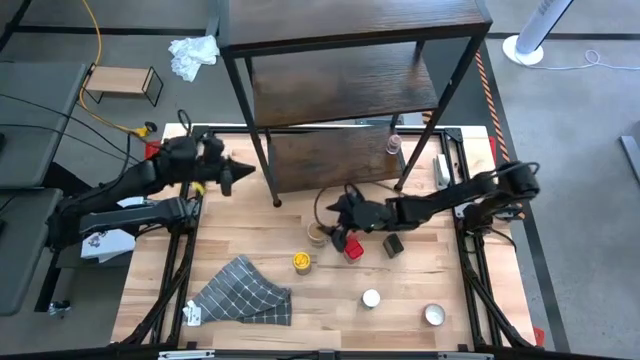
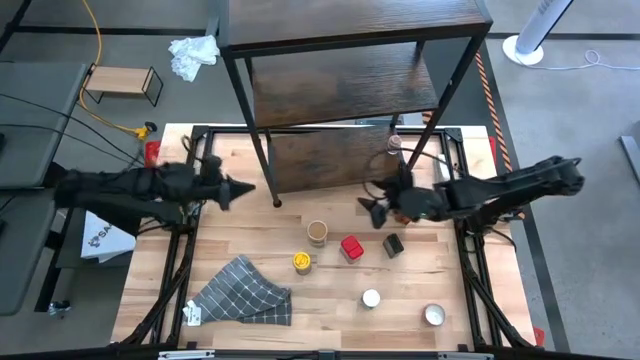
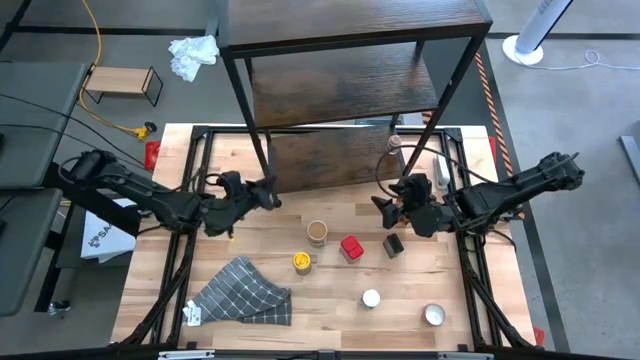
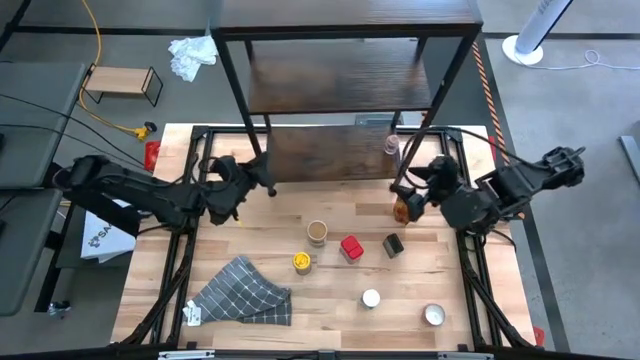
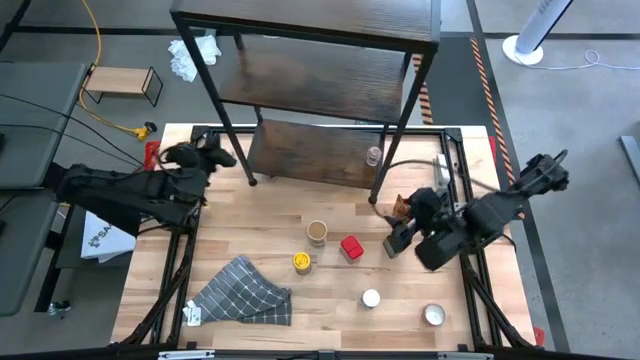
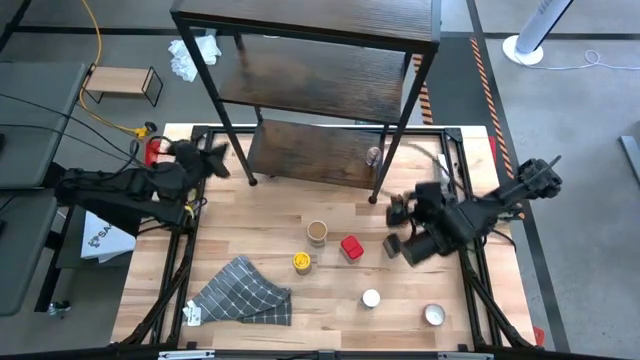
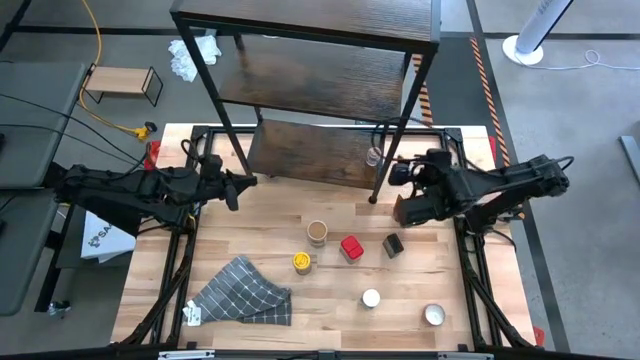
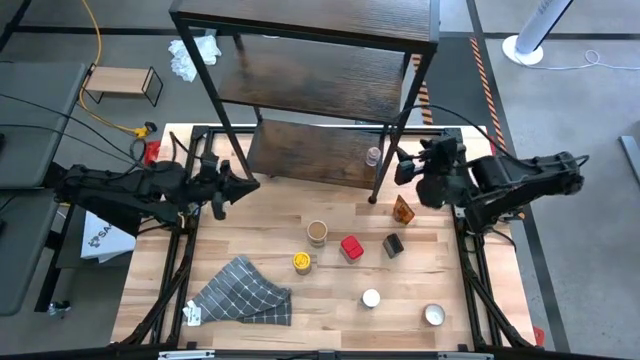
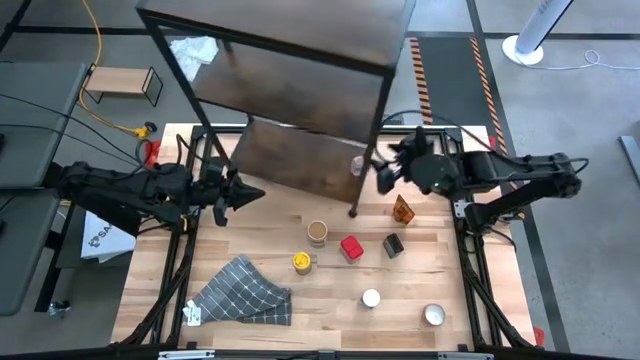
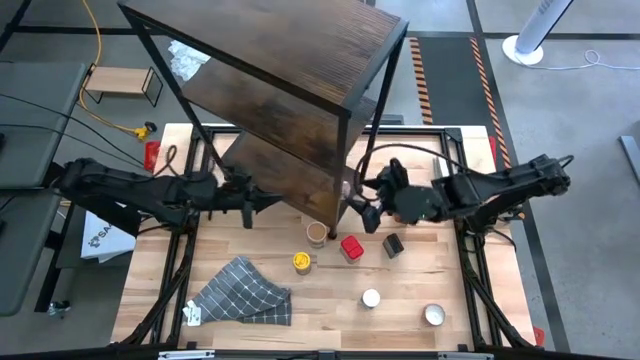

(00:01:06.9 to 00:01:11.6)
Task: Shelf spices
Adjust the shelf

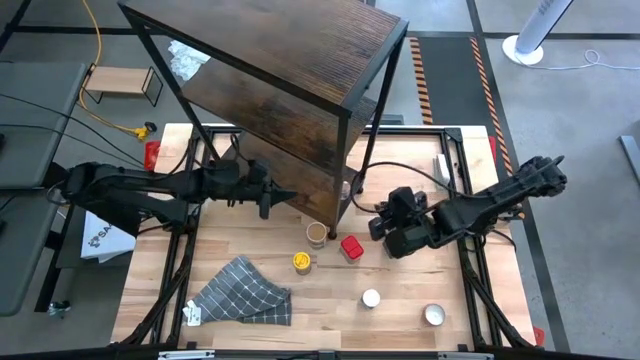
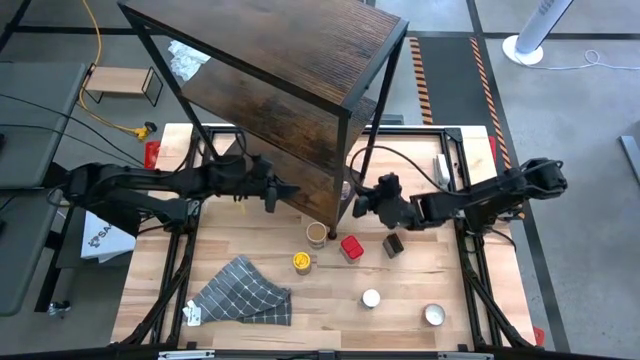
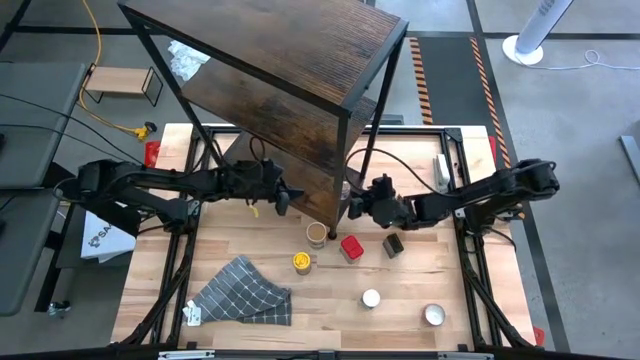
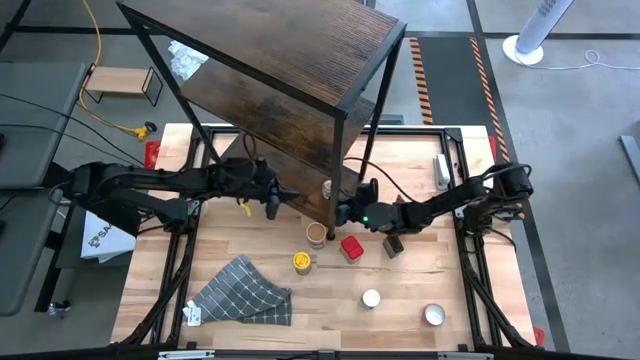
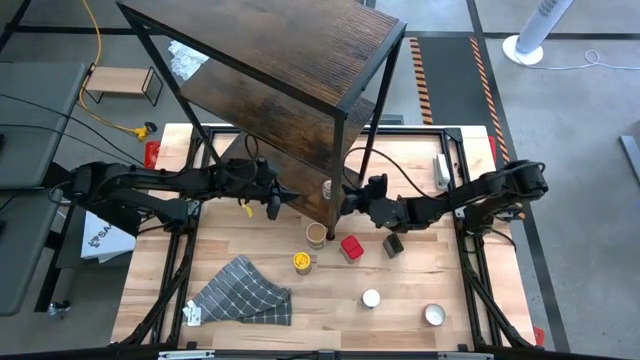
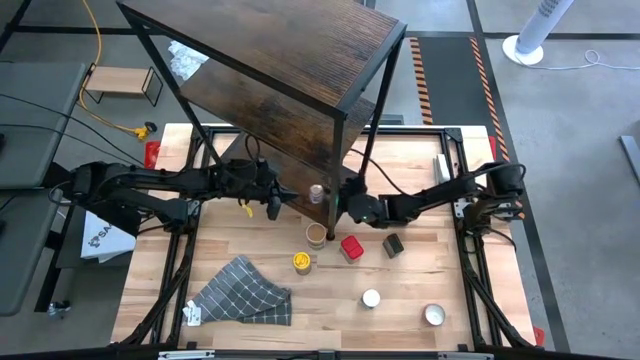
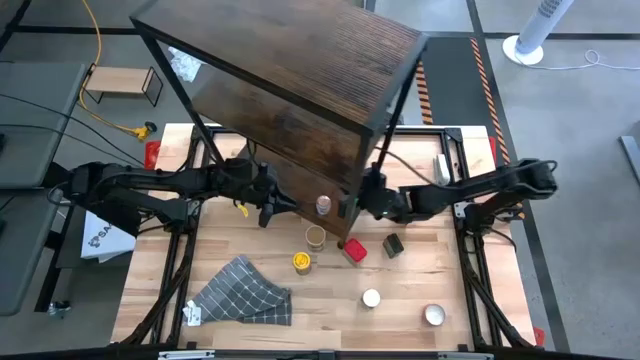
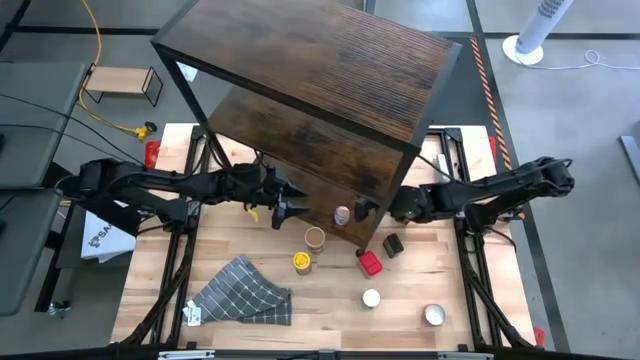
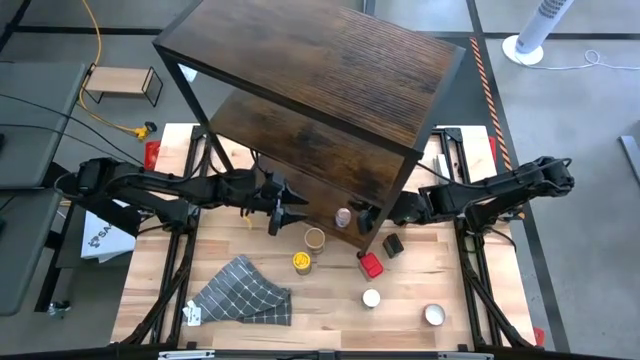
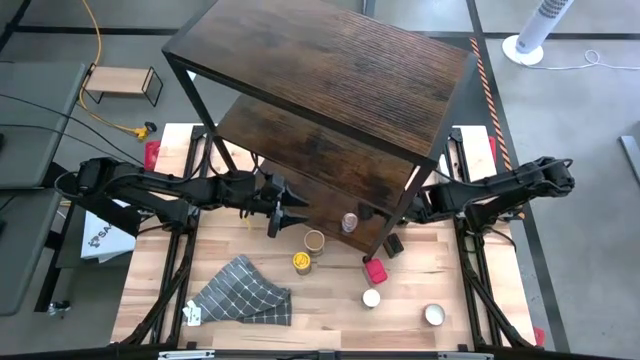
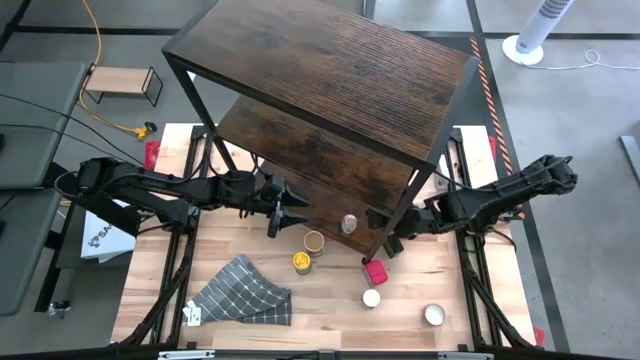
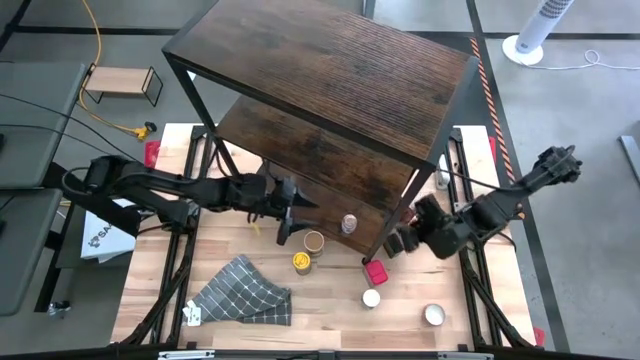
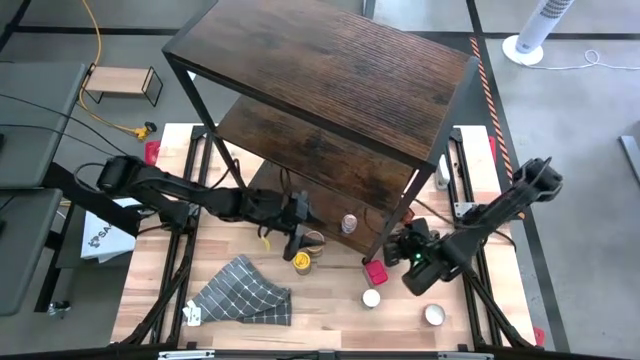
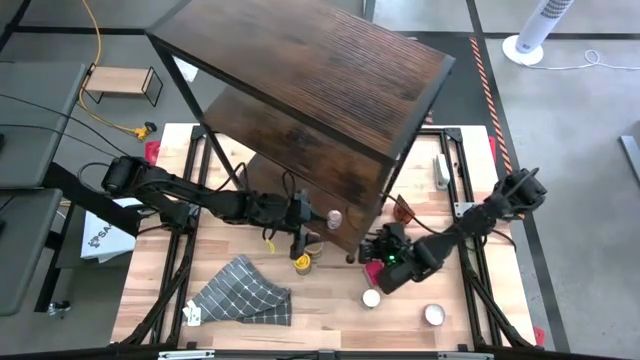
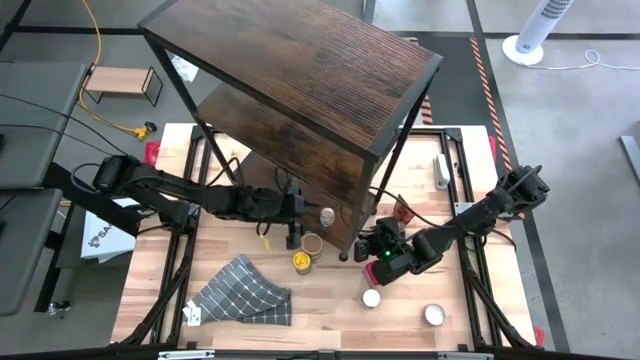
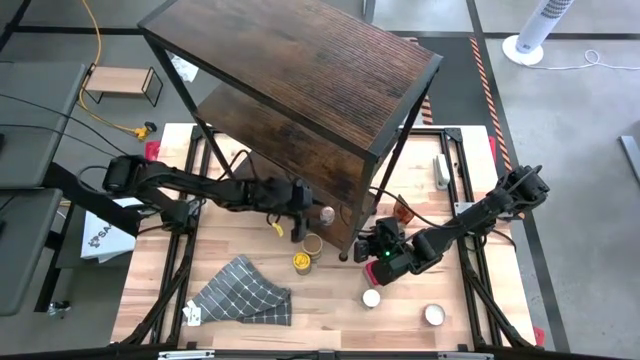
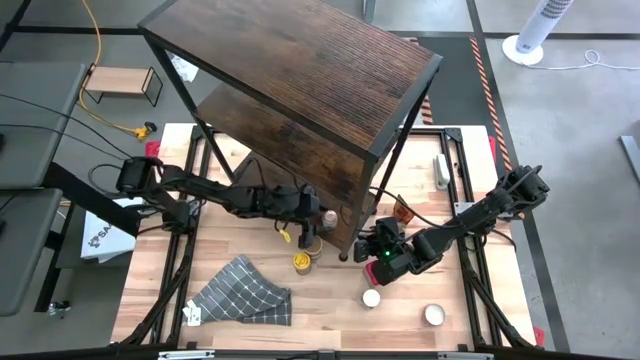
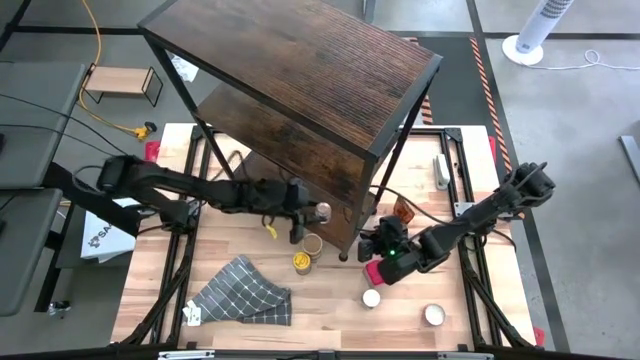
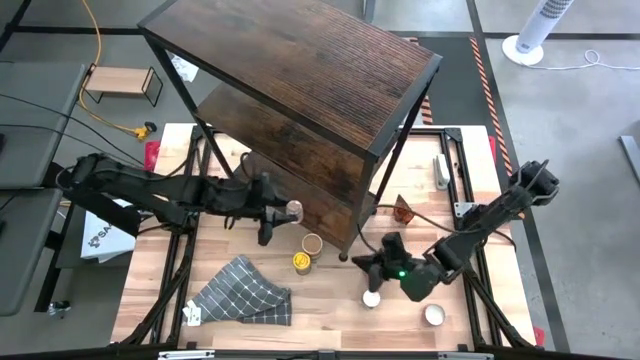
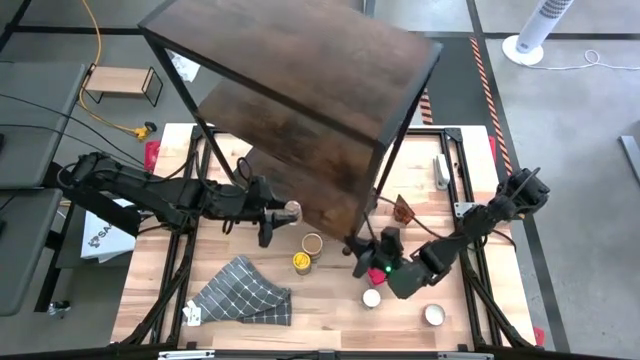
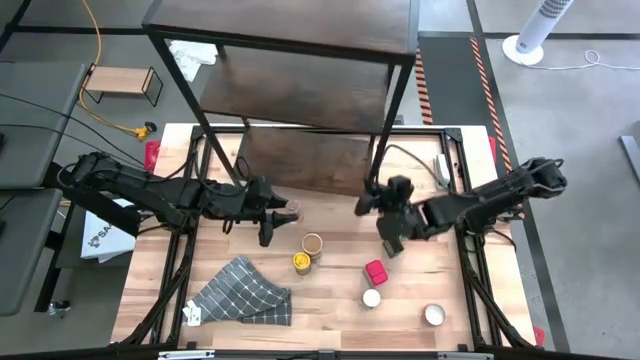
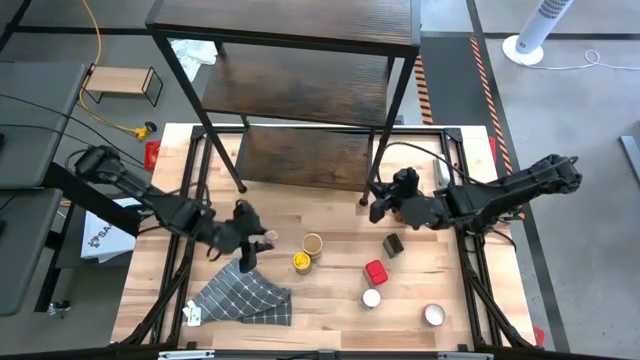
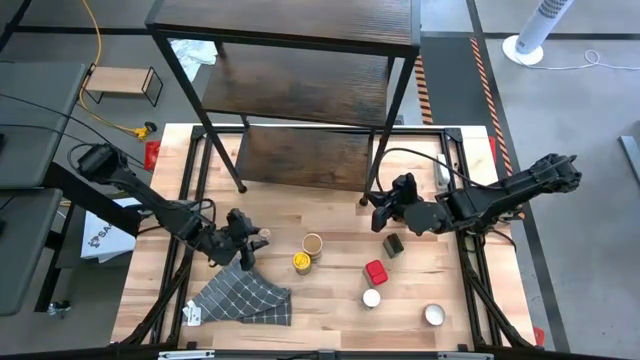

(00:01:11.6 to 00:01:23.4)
Remove the brown seasoning bottle from the shelf

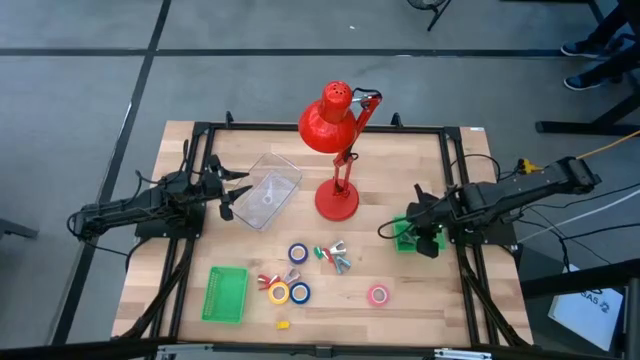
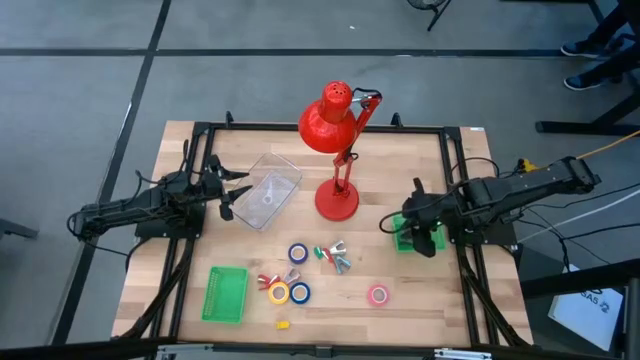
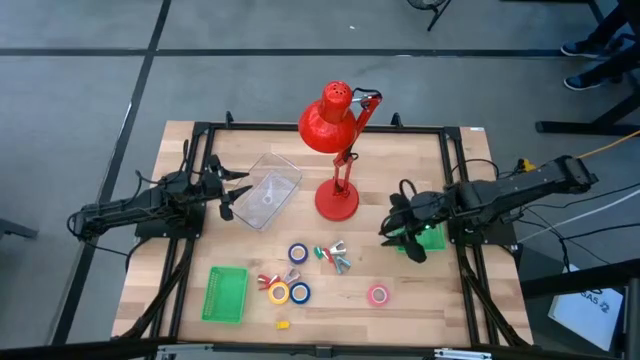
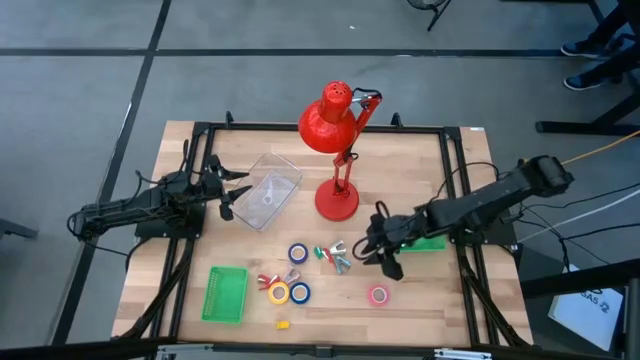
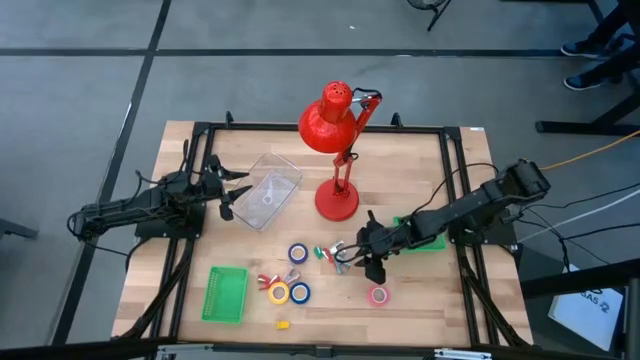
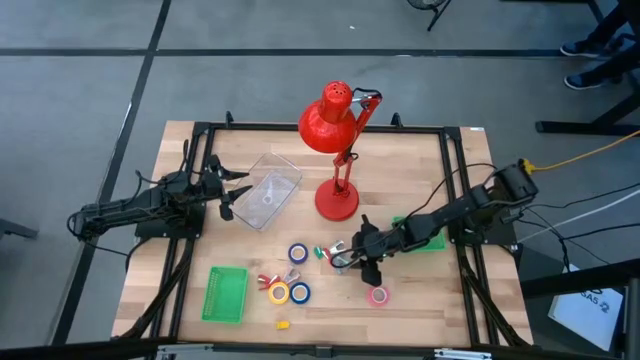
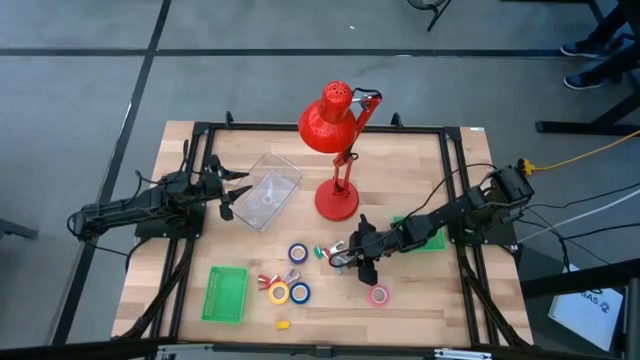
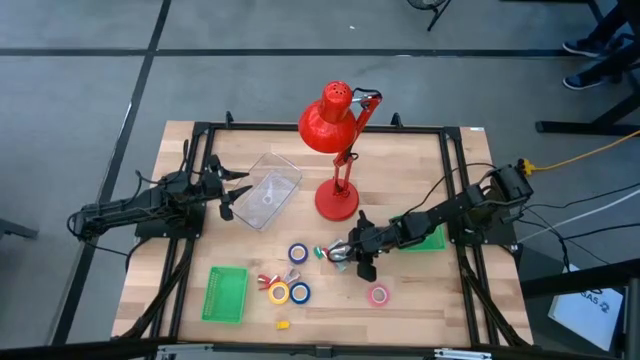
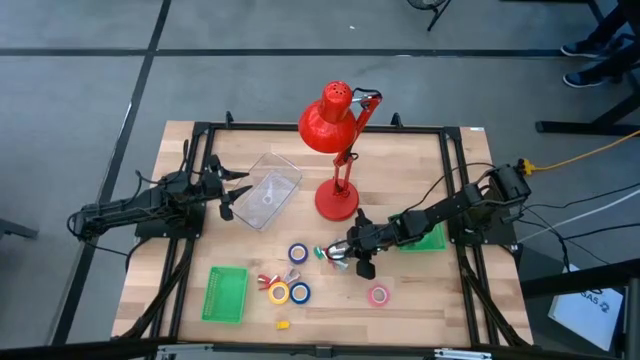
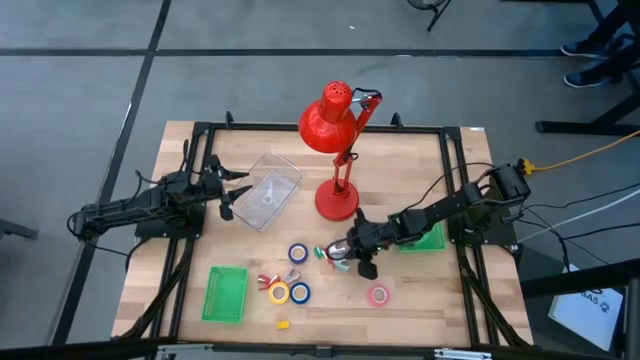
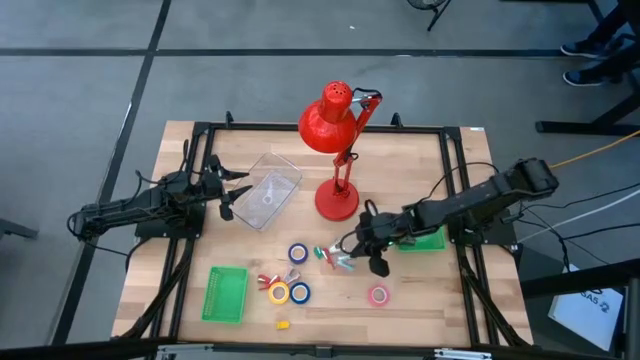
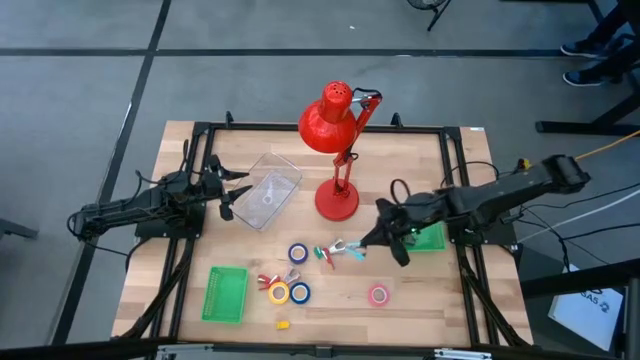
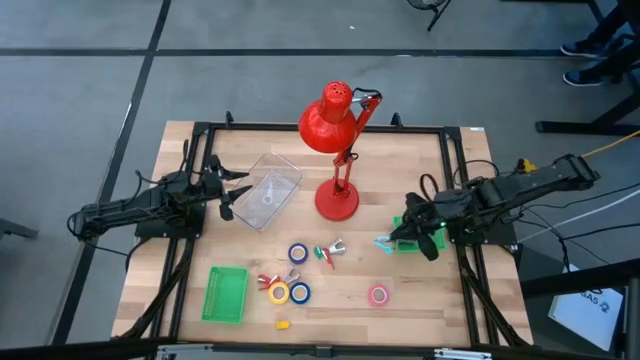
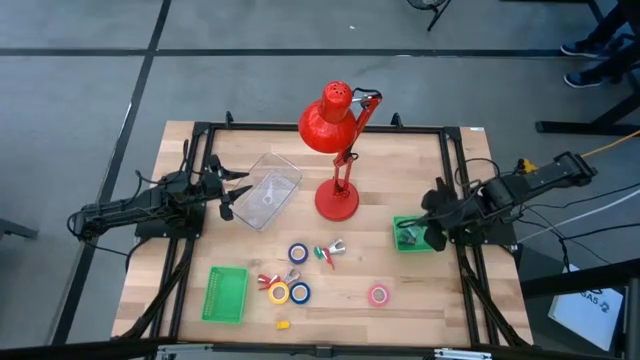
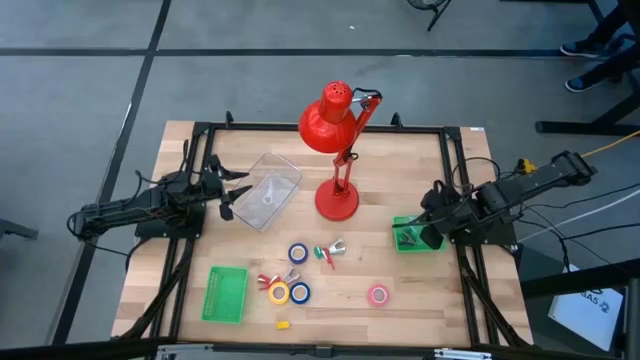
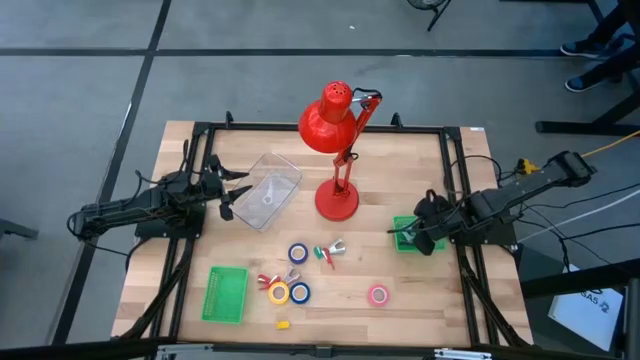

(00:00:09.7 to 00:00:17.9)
Task: Pick and place Stapler, Stapler remover, tape
Put the blue staple remover into the top green basket
